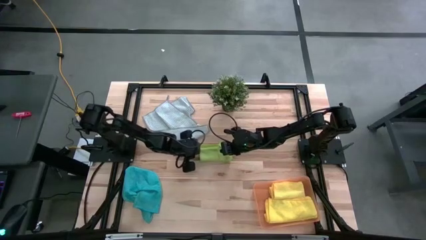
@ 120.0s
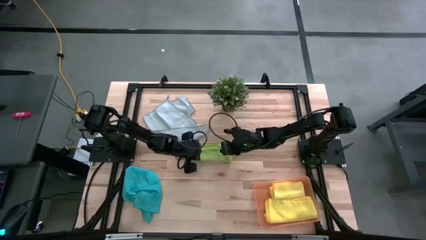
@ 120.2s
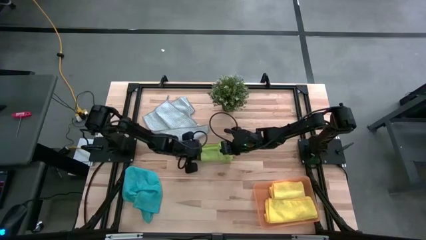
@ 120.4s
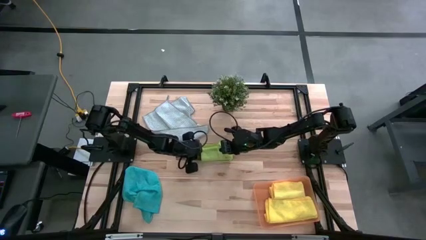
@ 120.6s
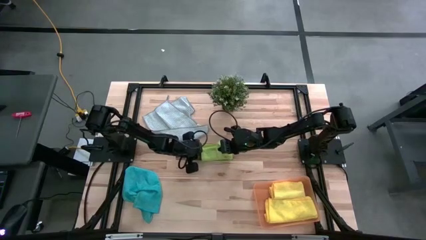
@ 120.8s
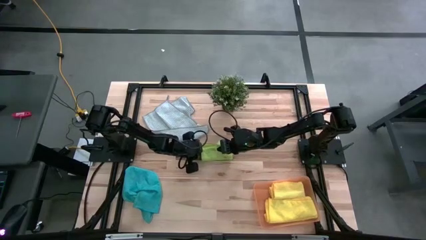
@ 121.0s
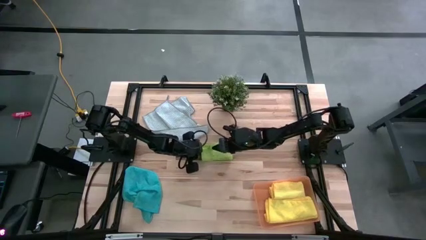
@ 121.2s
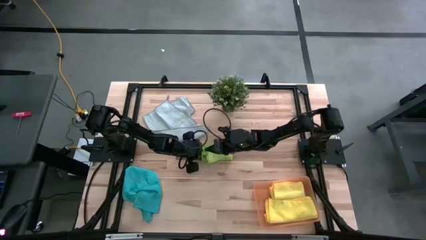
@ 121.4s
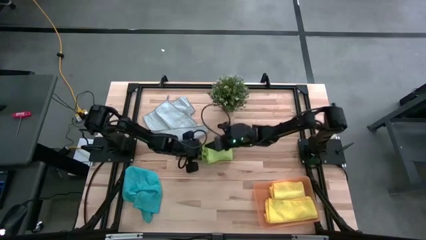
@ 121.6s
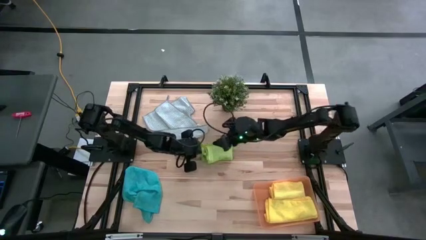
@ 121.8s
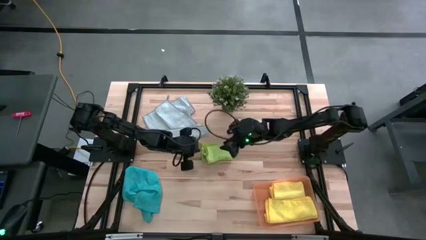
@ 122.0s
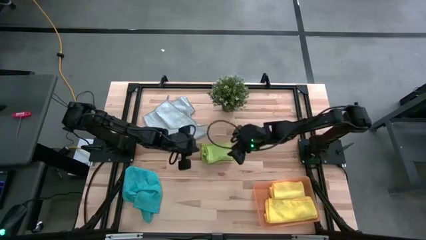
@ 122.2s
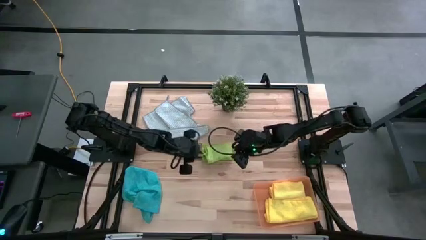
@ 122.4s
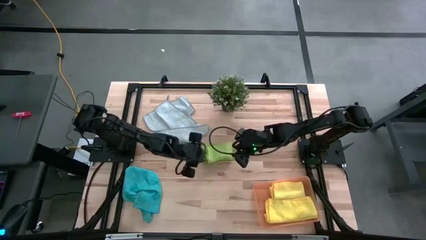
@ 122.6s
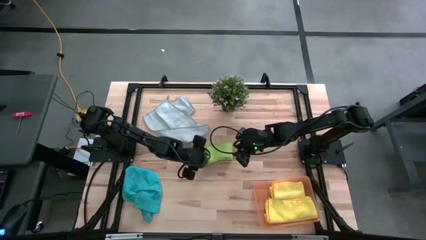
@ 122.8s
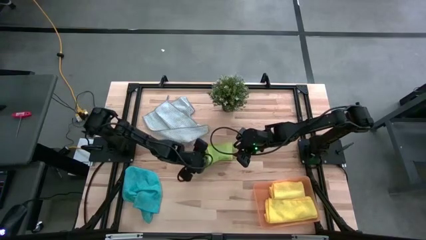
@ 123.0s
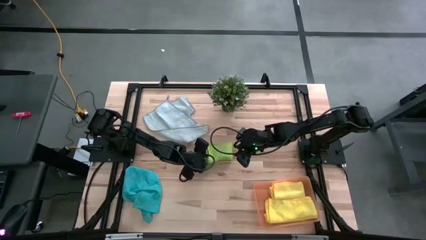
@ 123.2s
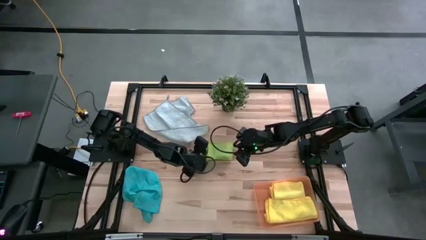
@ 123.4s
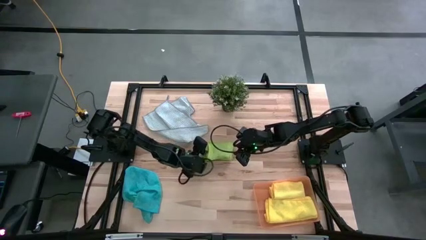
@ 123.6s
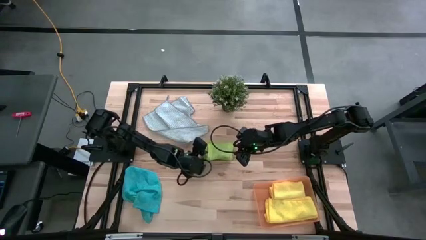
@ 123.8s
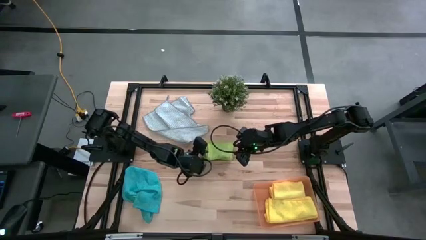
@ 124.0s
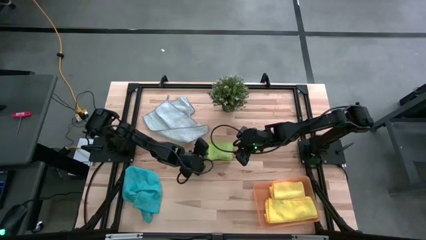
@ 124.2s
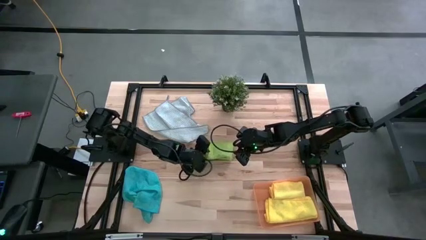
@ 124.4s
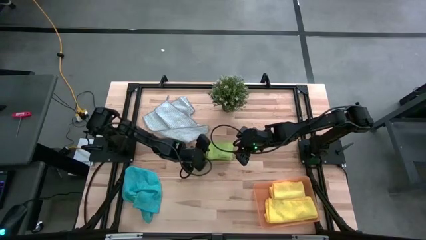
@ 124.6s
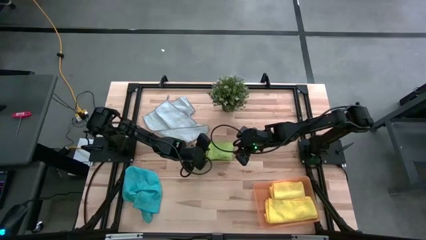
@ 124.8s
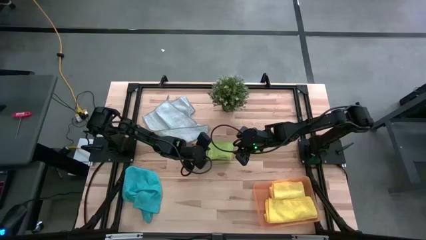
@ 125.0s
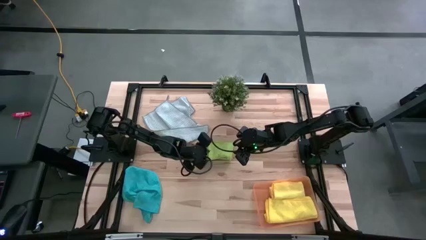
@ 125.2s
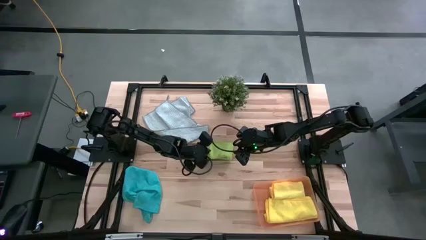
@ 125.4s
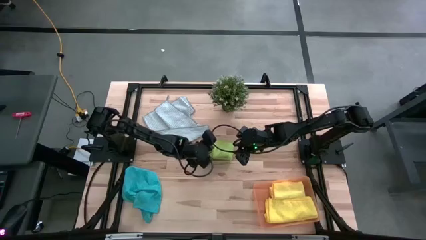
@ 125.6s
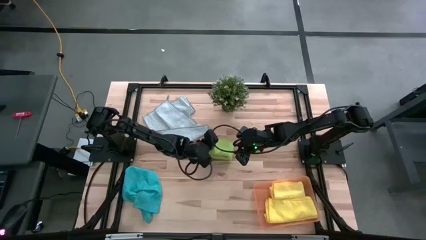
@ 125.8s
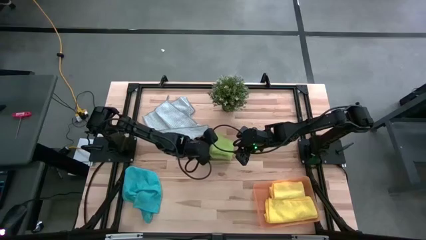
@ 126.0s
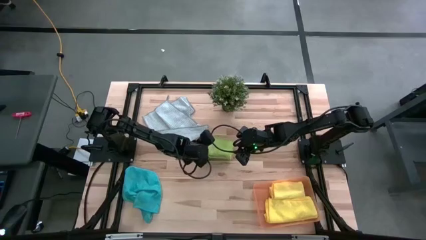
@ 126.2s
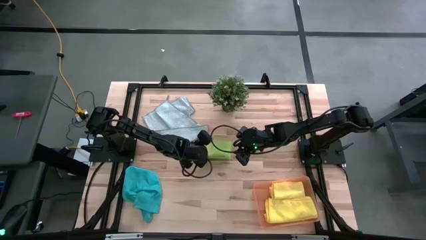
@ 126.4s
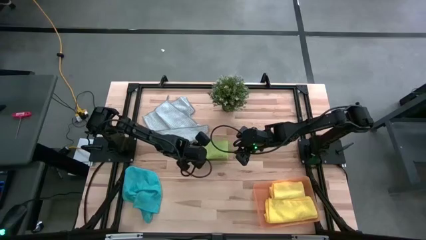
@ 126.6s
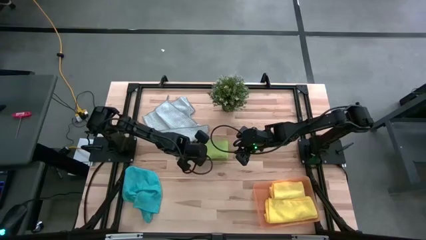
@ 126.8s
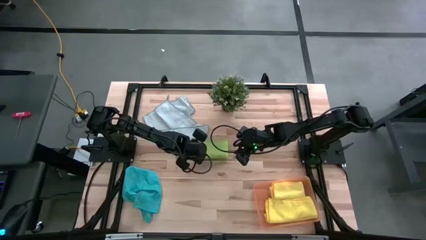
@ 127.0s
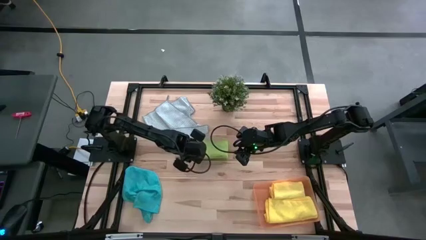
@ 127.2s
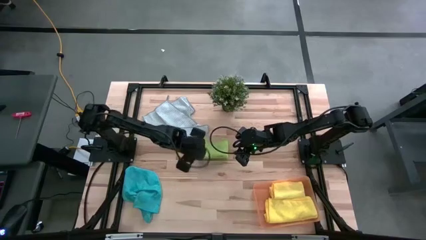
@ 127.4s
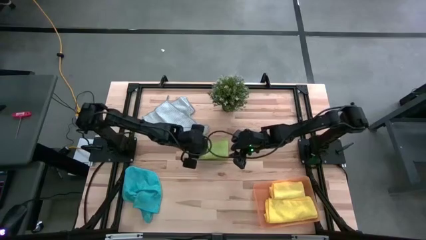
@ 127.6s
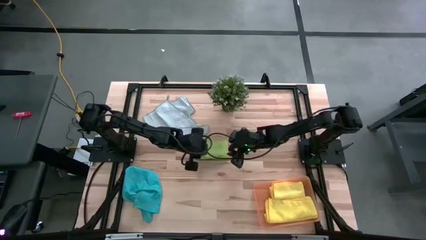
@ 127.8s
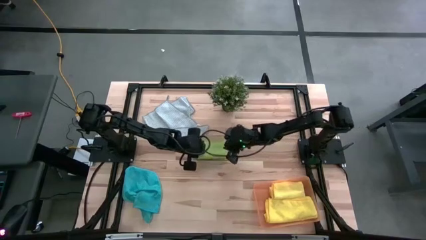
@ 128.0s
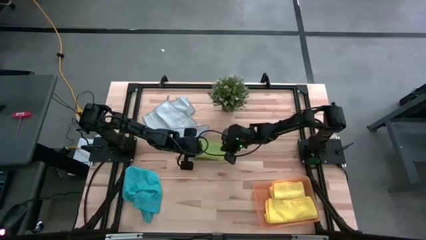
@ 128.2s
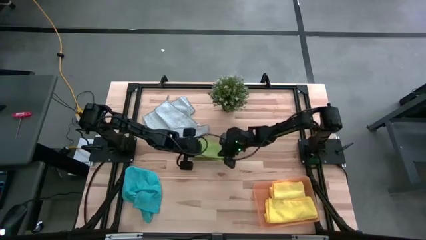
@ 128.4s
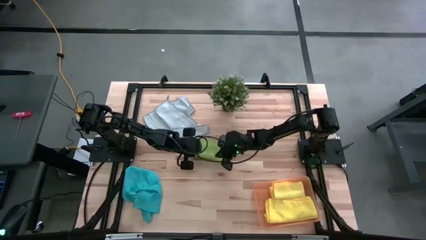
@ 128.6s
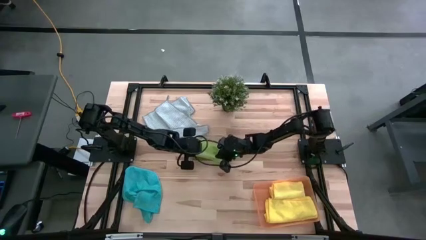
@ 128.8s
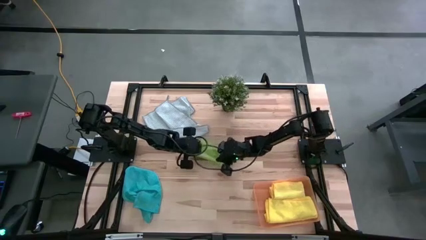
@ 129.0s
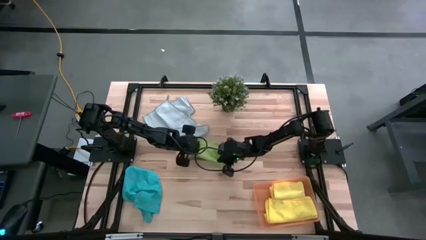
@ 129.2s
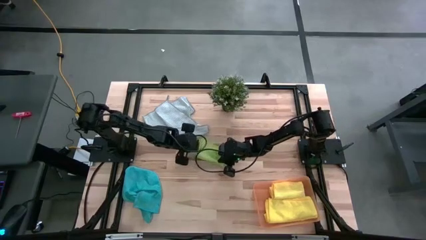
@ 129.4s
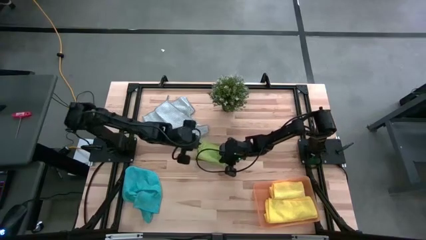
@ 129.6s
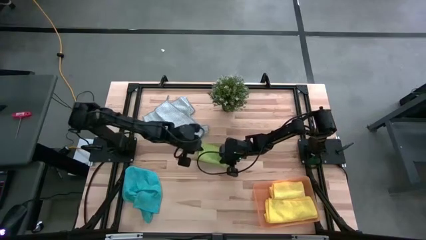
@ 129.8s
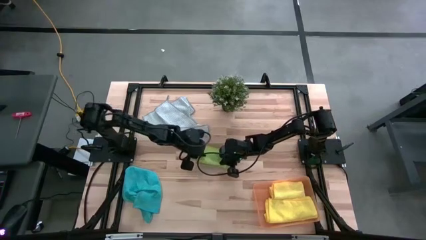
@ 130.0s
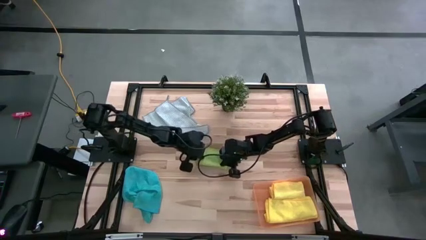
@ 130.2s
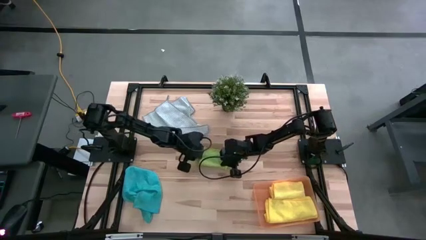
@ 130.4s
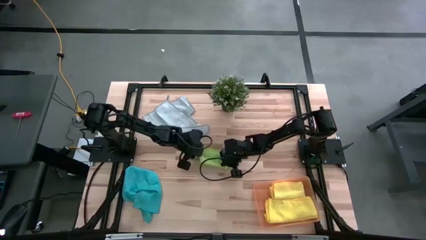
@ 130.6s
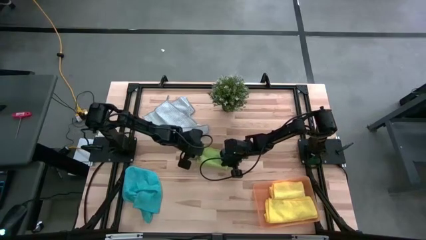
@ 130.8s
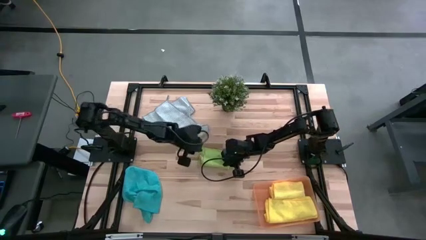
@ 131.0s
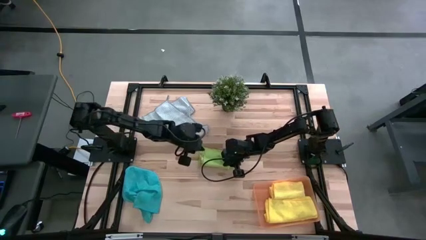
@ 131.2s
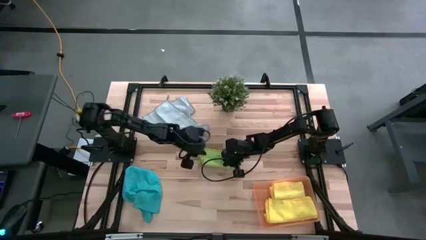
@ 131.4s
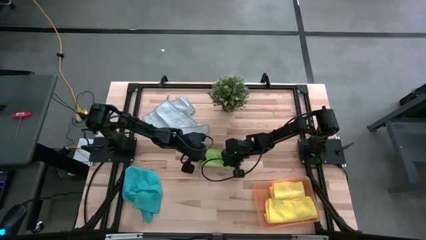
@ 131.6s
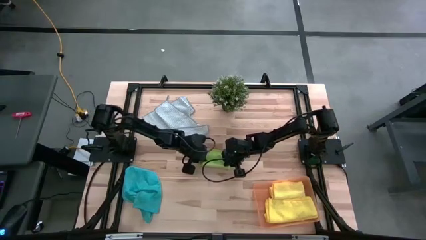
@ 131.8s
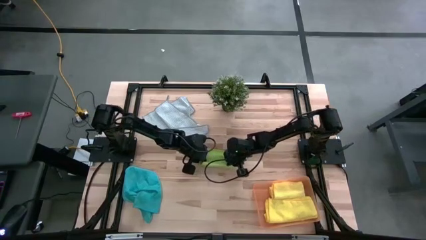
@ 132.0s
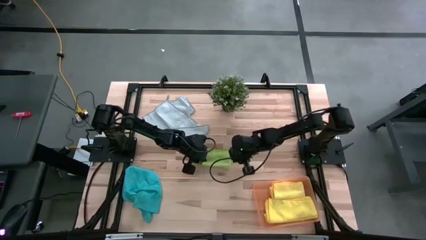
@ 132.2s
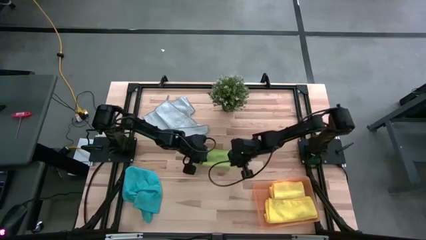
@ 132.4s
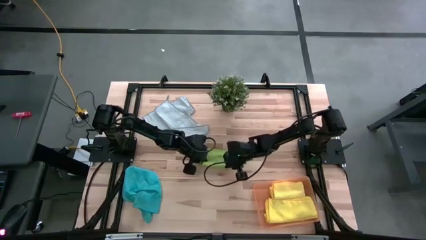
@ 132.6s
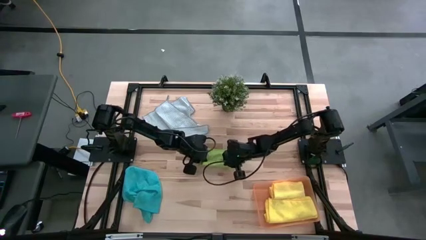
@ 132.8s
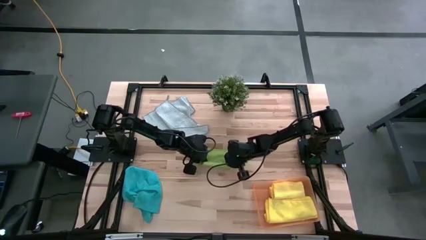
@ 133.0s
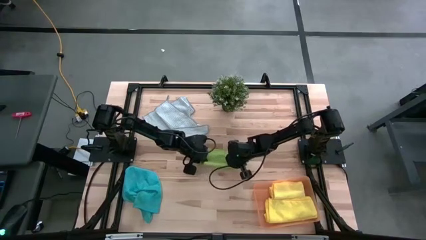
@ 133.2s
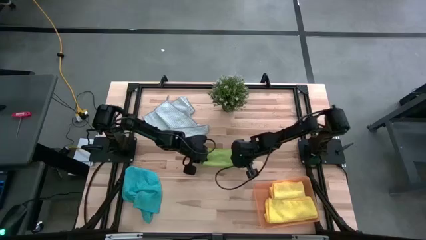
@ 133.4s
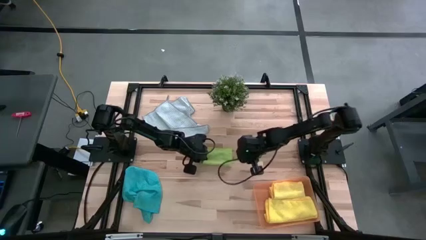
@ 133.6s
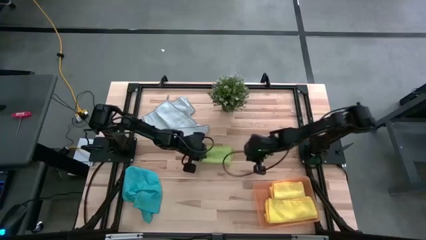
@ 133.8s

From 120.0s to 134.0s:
Task: Fold microfiber towels
Fold the green microfiber towel

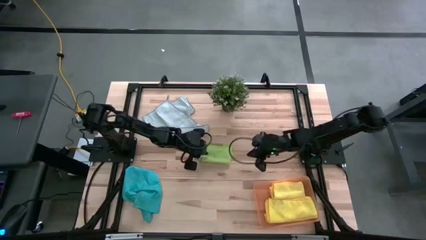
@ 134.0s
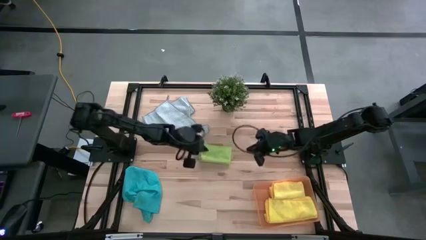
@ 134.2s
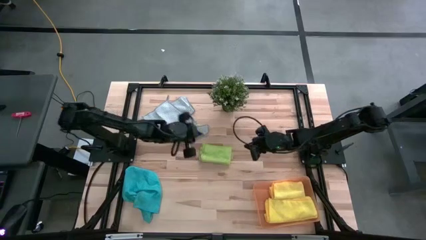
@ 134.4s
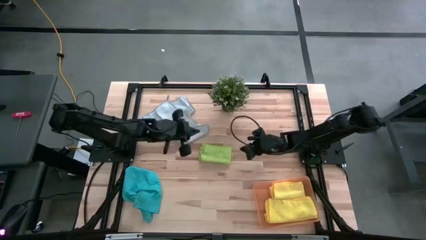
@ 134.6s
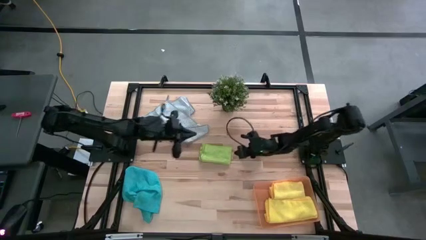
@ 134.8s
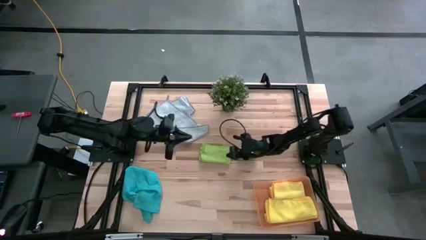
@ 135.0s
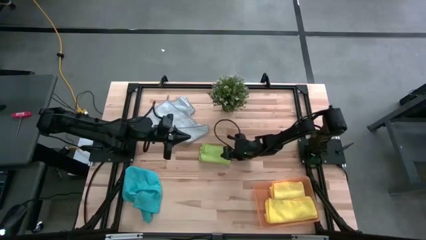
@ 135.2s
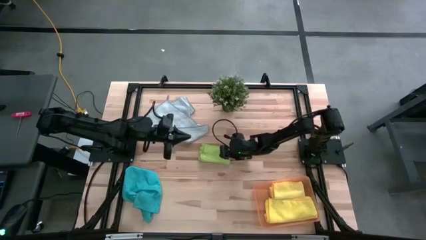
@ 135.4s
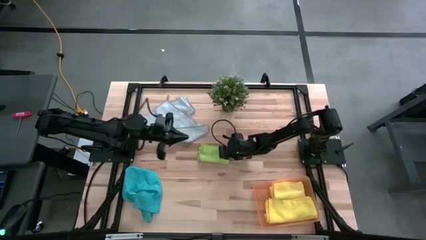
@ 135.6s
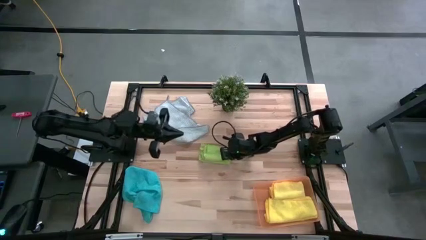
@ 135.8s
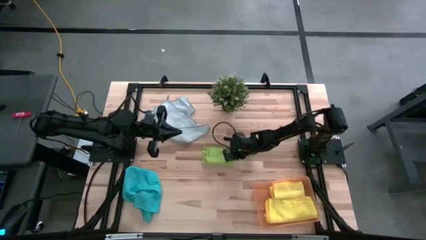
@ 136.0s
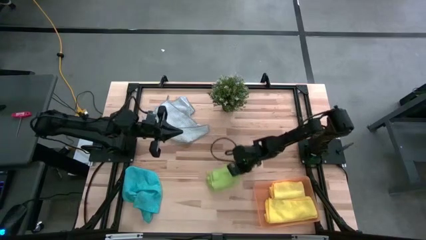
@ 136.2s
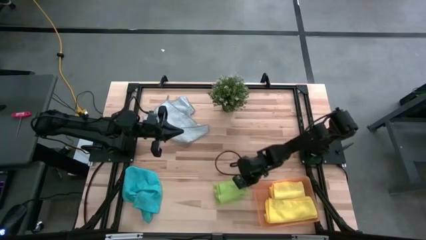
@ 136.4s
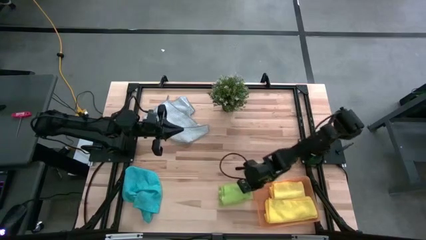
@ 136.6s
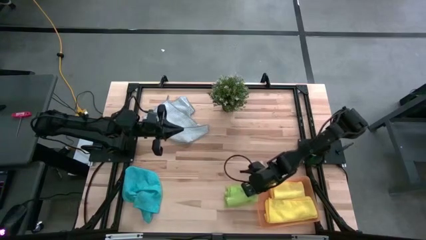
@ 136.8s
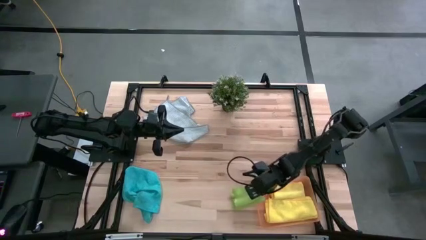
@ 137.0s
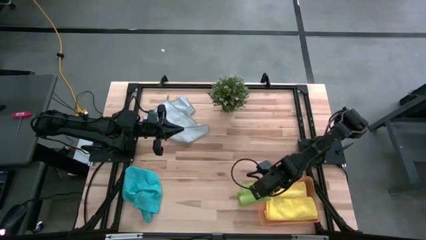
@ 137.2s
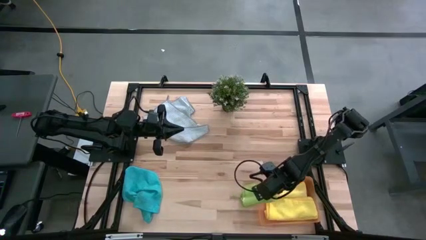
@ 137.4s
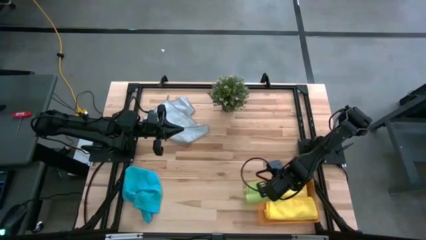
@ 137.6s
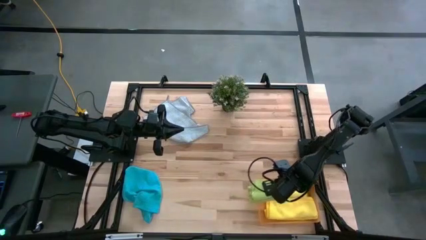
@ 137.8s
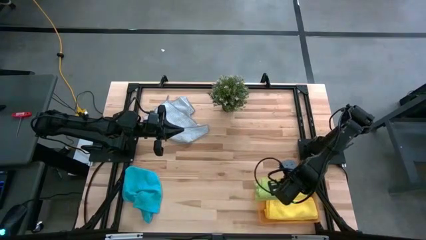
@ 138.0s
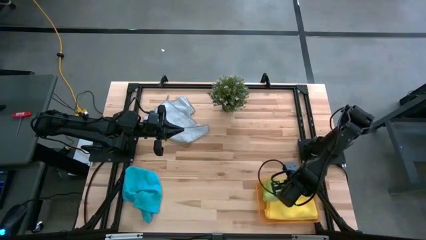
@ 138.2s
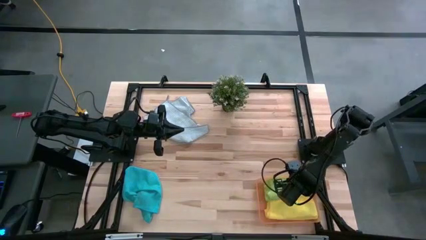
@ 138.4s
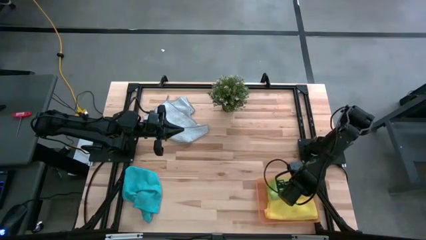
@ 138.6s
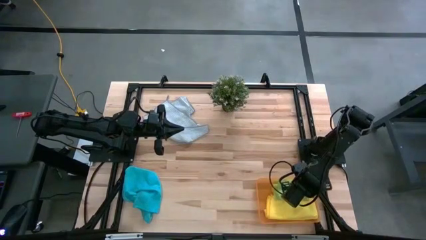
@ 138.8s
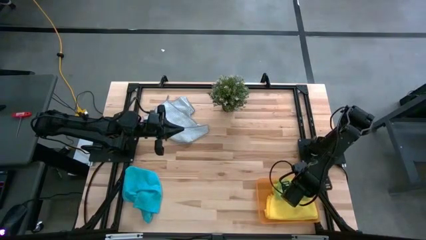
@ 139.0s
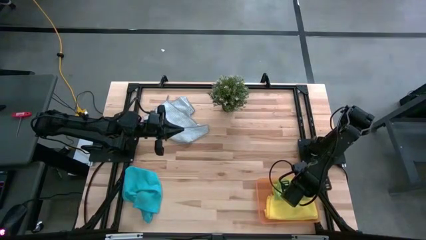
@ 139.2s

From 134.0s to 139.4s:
Put the folded green microfiber towel into the orange bin
